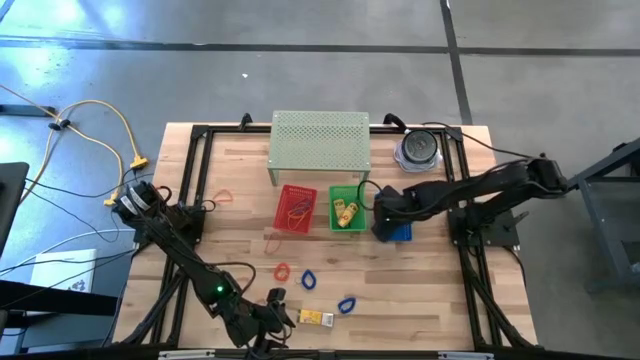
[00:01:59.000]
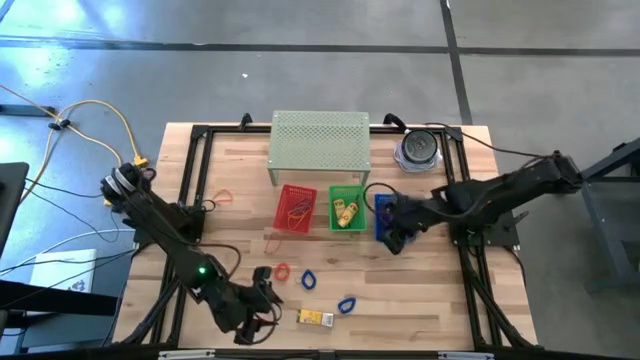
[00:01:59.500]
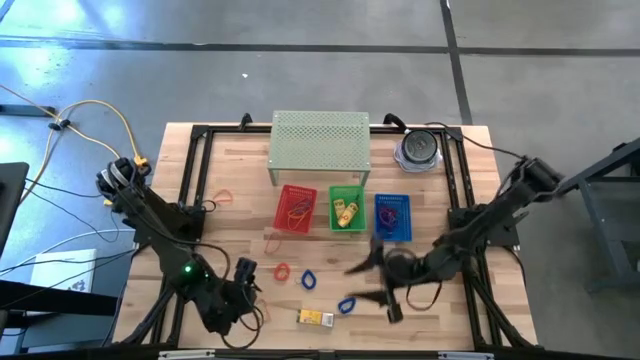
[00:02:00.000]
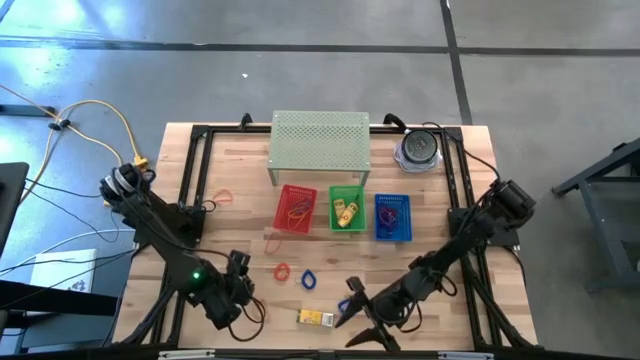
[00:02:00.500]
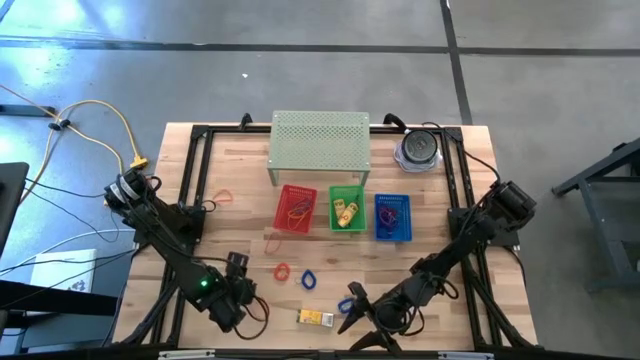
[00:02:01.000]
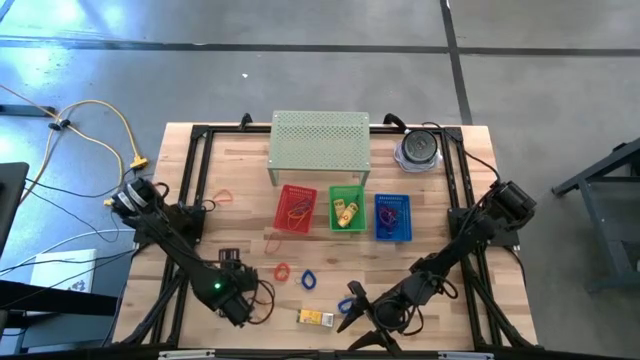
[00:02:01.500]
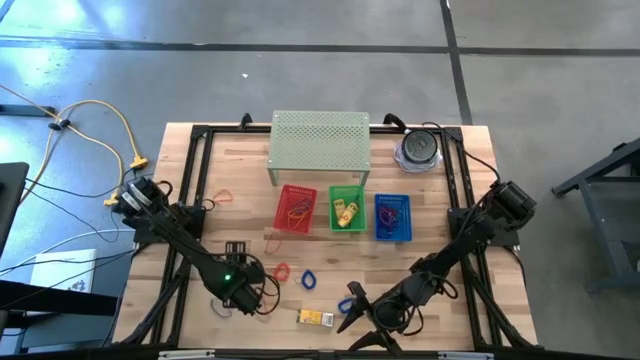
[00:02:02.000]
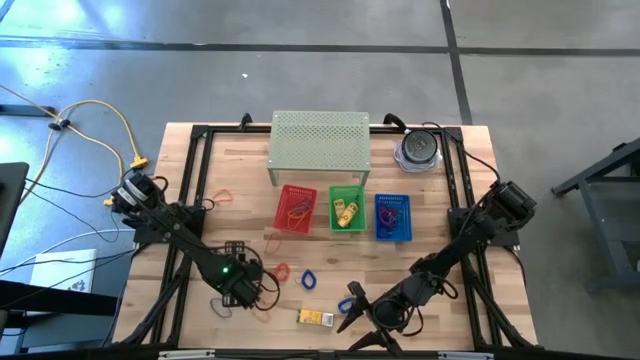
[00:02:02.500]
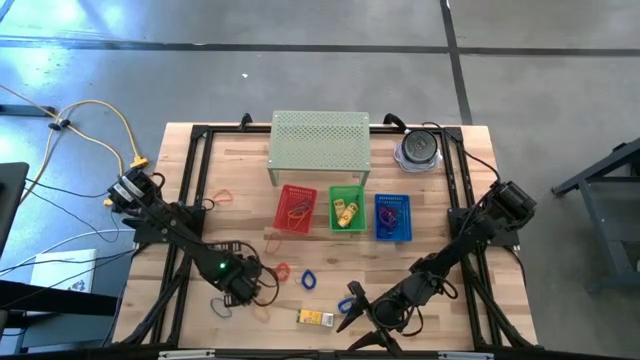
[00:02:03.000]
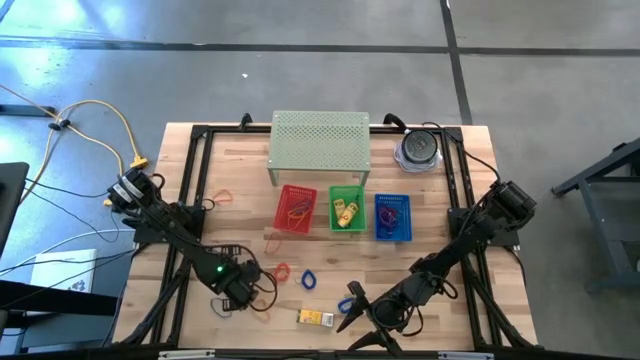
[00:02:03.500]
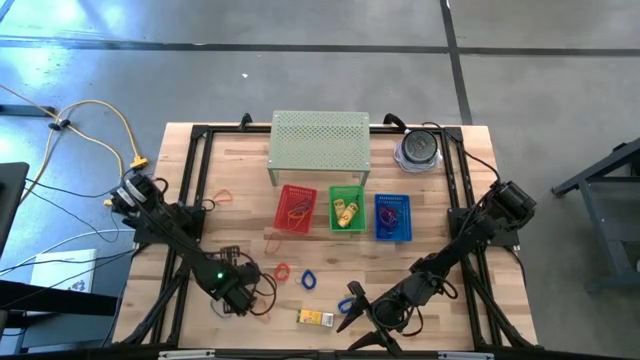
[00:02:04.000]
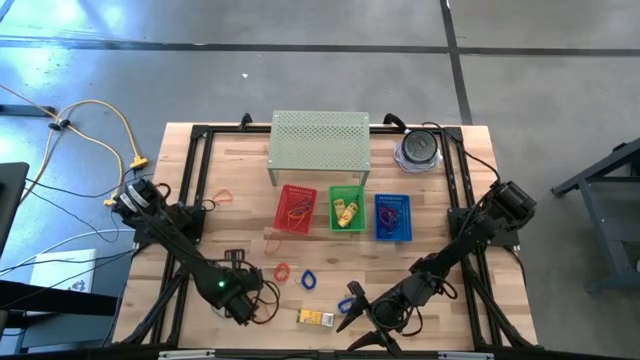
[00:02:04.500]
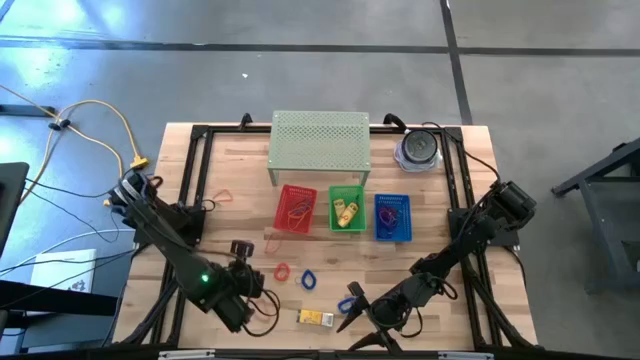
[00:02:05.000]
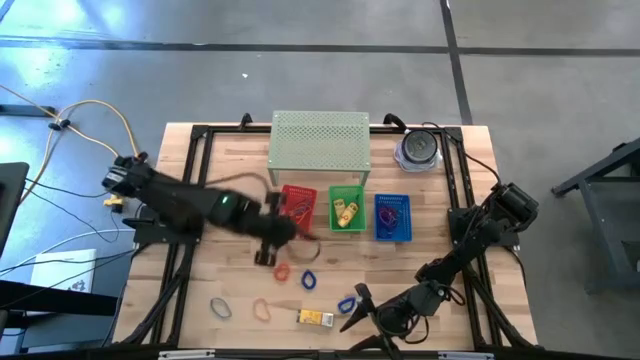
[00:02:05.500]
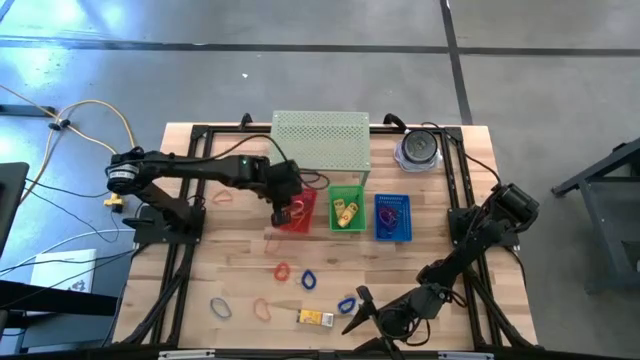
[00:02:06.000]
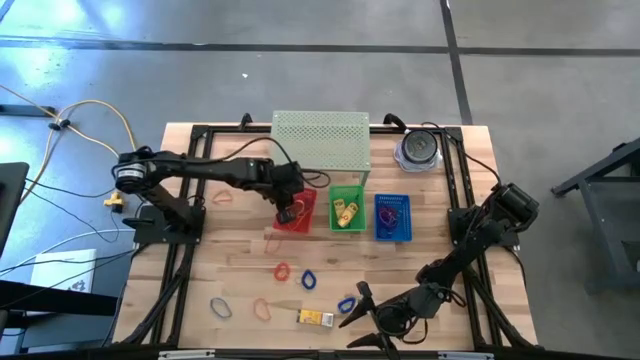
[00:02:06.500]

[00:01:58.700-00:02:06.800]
Task: Pick & Place Office Desk Supplies
Put the orange rubber band into the red bin

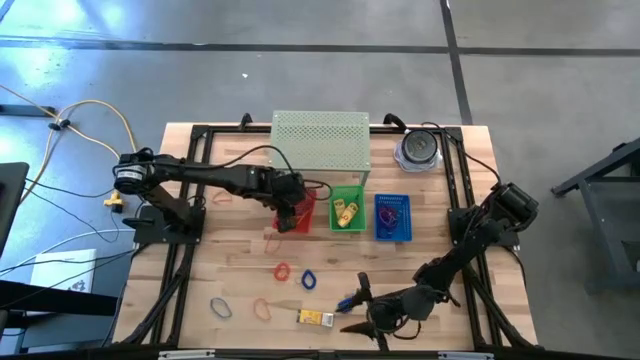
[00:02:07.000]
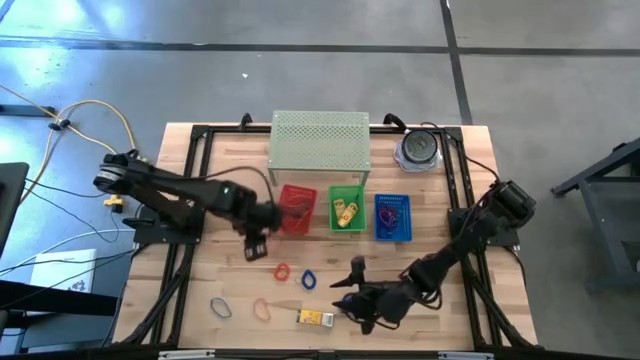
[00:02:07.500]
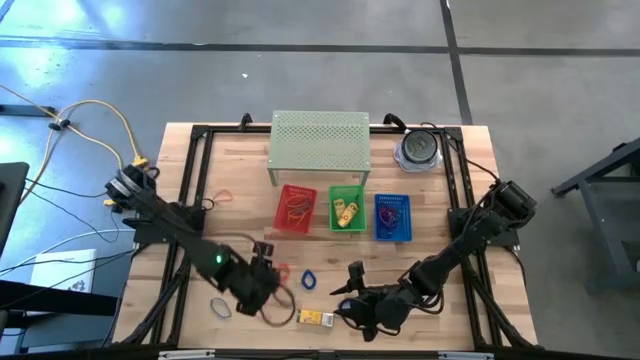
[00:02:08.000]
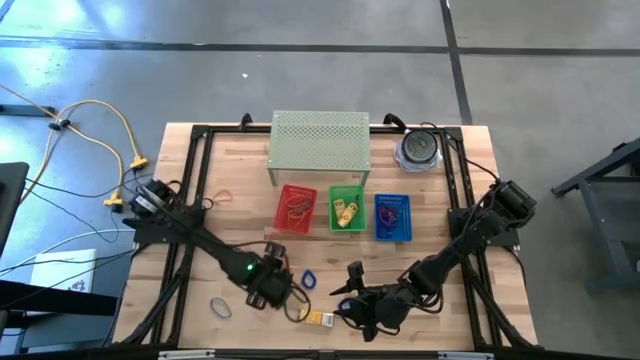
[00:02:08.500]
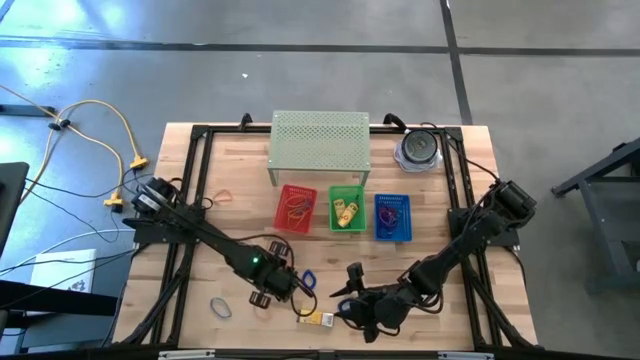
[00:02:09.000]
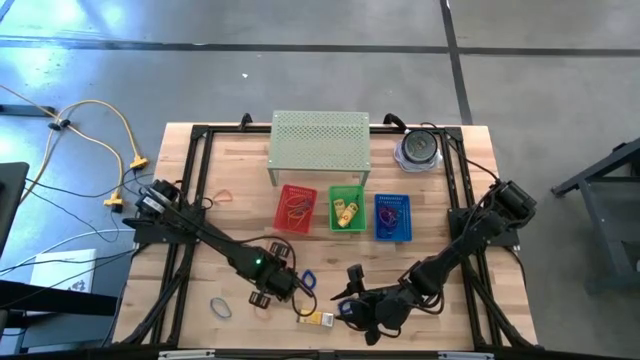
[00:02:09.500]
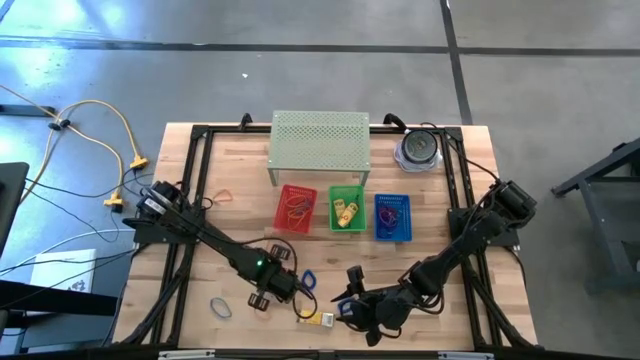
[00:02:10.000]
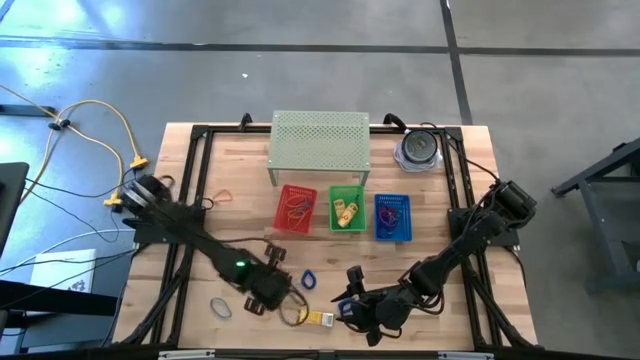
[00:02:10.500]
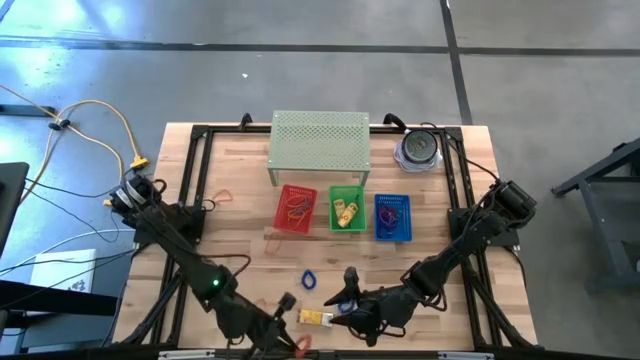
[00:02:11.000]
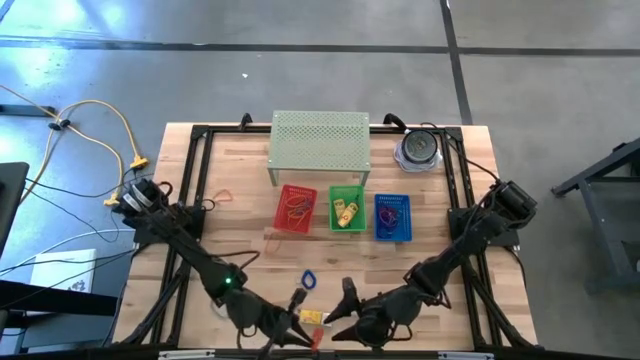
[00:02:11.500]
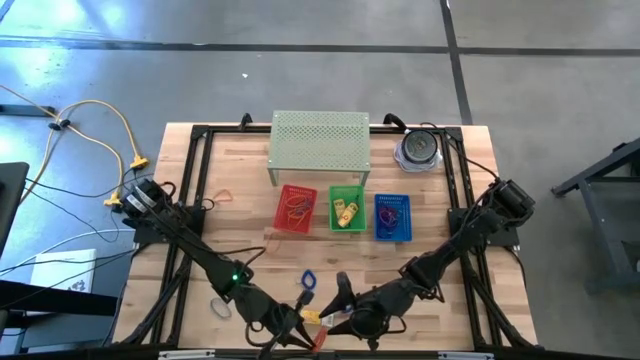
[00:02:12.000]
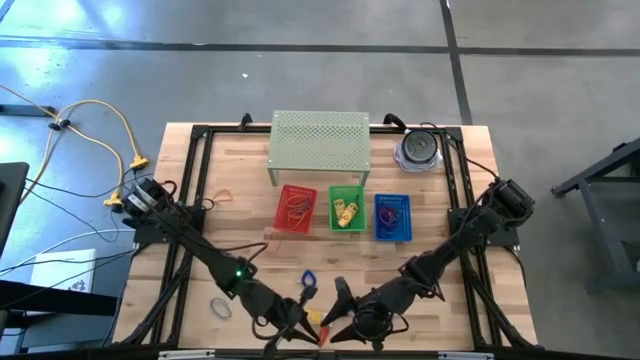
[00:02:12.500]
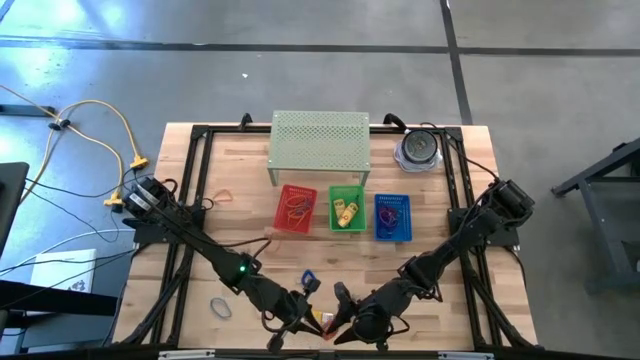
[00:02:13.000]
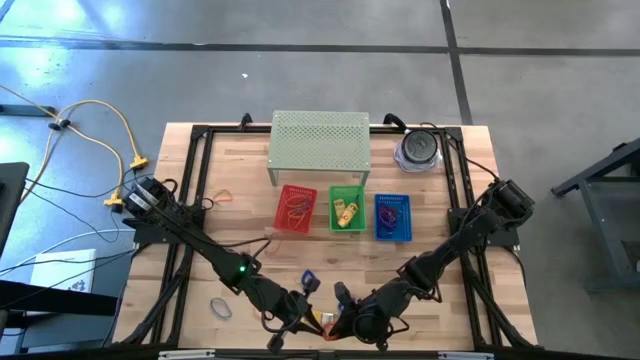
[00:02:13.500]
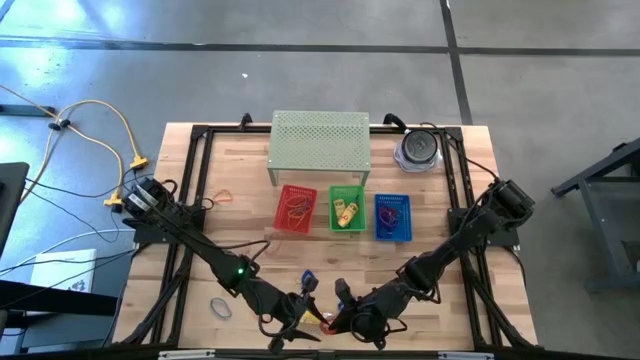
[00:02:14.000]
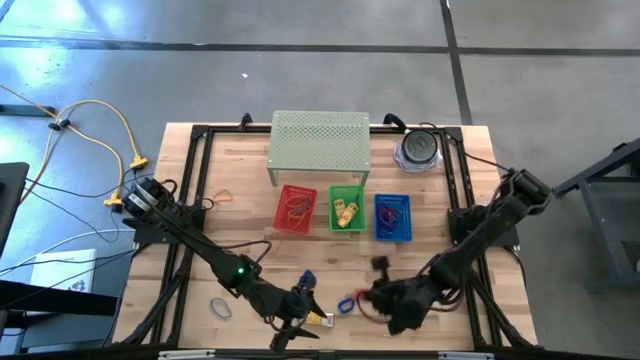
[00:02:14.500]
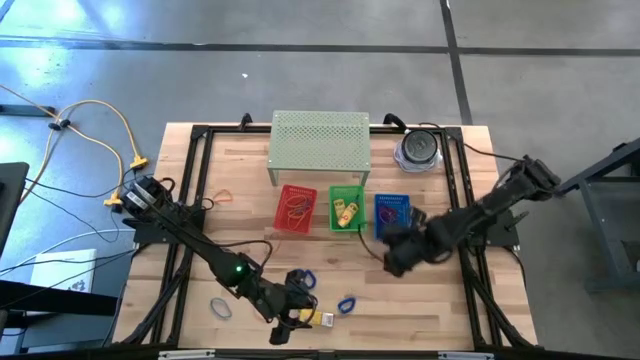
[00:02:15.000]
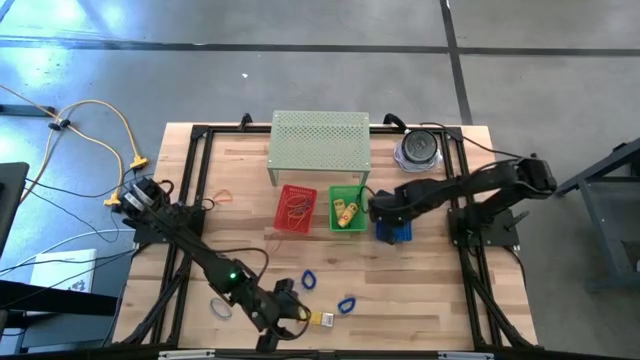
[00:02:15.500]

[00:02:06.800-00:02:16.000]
Put the orange spring keychain into the blue bin

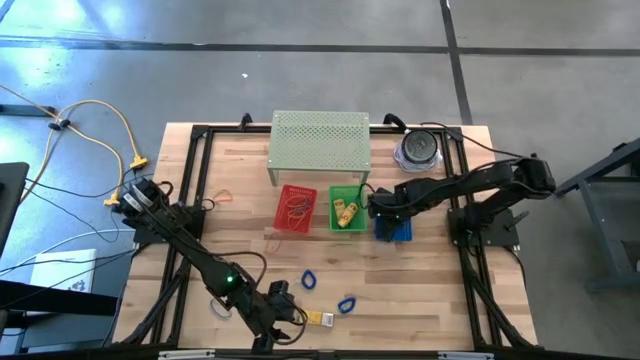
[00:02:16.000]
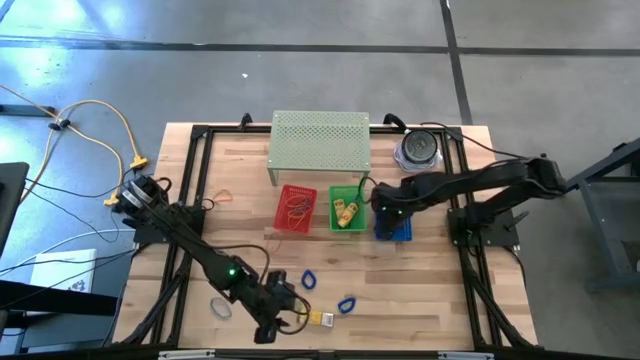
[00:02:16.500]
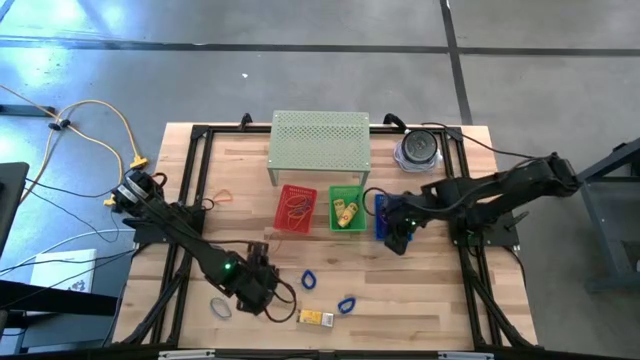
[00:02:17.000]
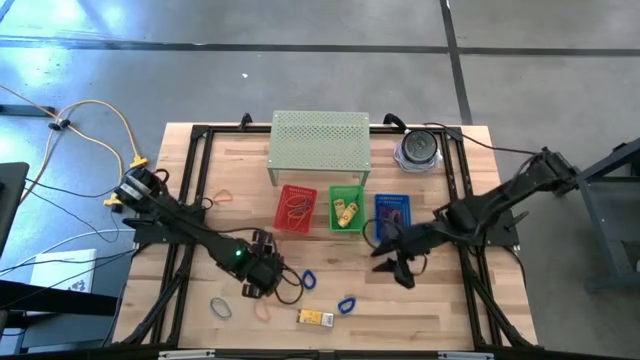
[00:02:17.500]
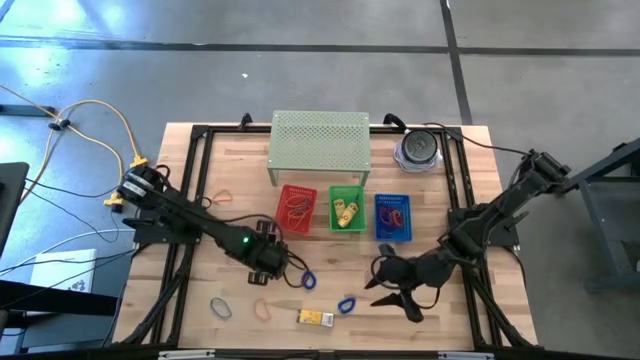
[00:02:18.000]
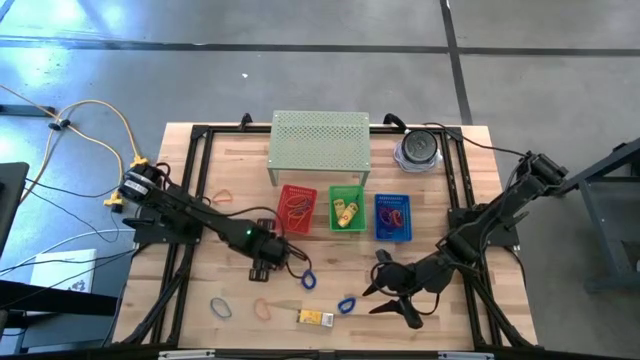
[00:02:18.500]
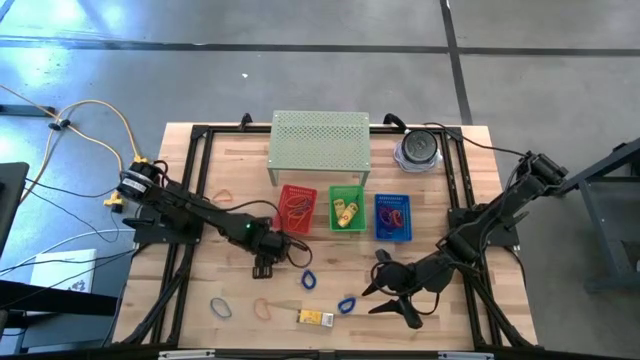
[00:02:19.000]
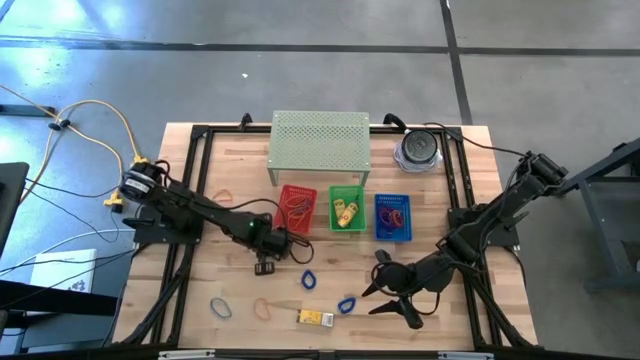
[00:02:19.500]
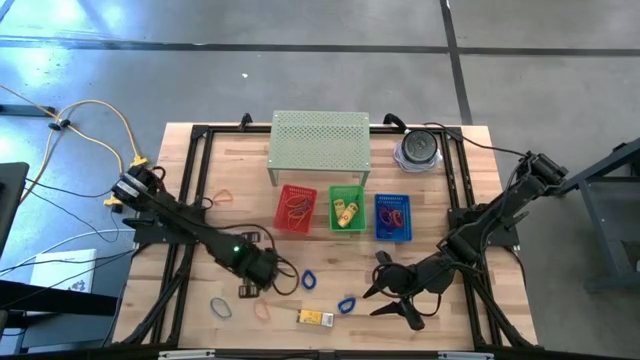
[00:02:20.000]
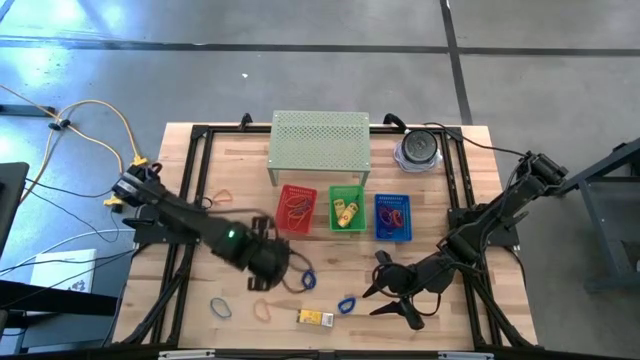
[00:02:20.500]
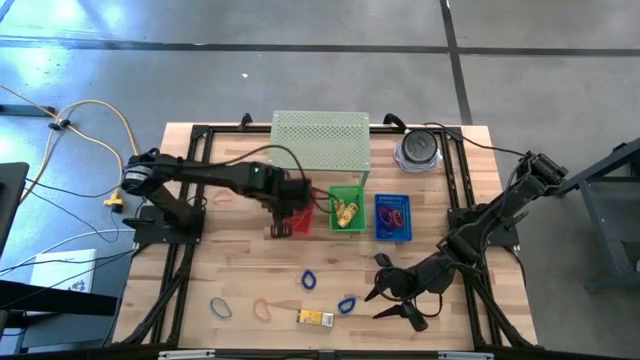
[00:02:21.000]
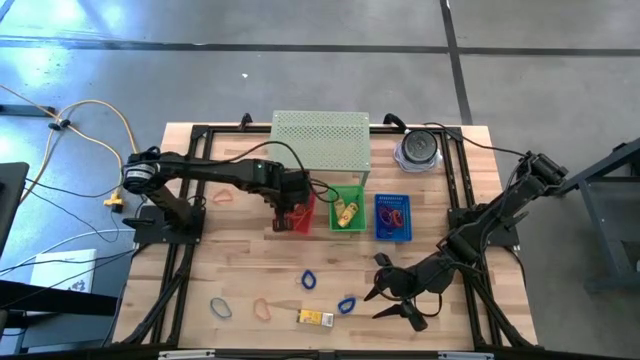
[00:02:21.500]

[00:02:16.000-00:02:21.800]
Put the middle orange rubber band into the red bin
